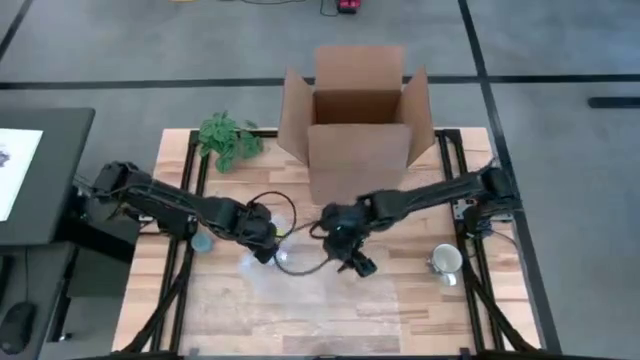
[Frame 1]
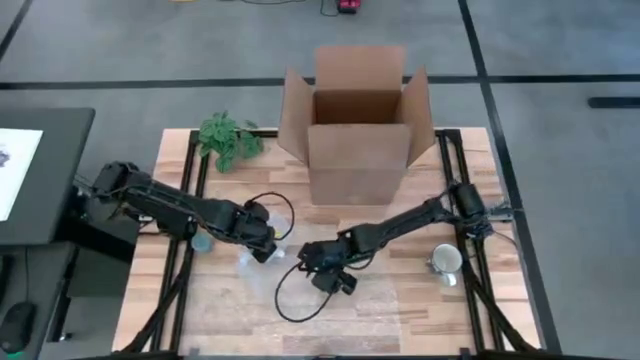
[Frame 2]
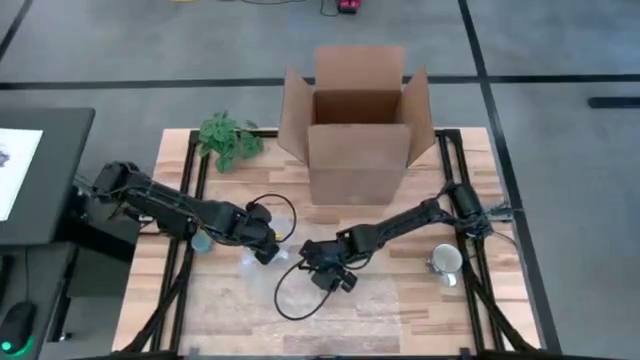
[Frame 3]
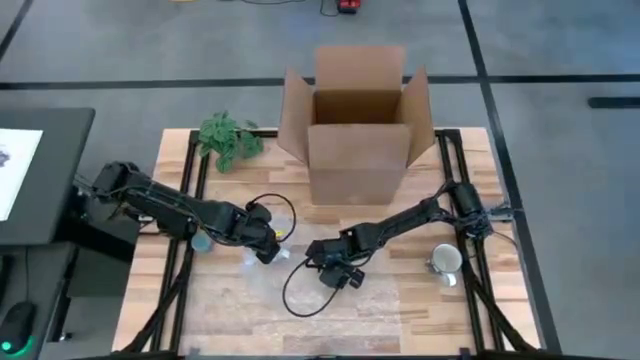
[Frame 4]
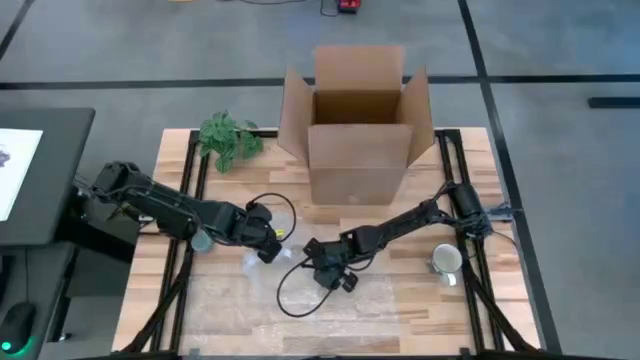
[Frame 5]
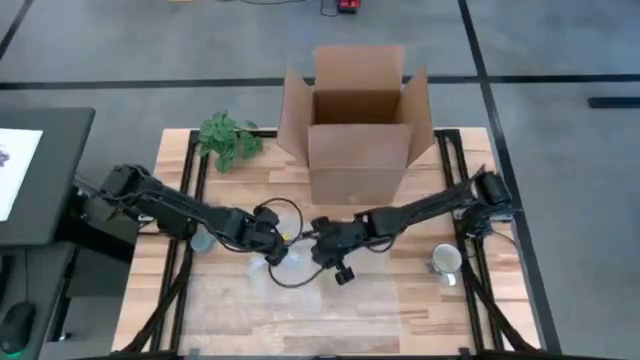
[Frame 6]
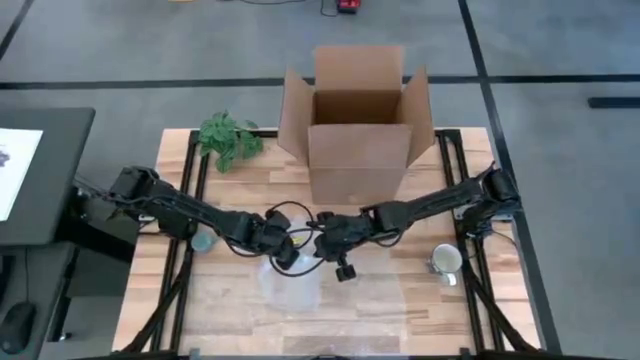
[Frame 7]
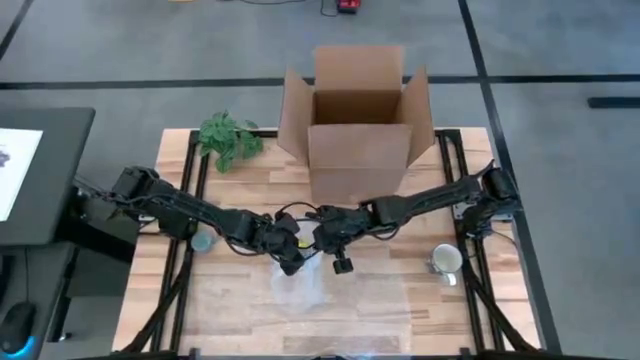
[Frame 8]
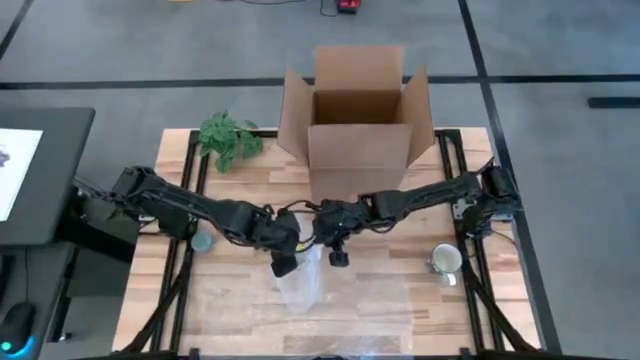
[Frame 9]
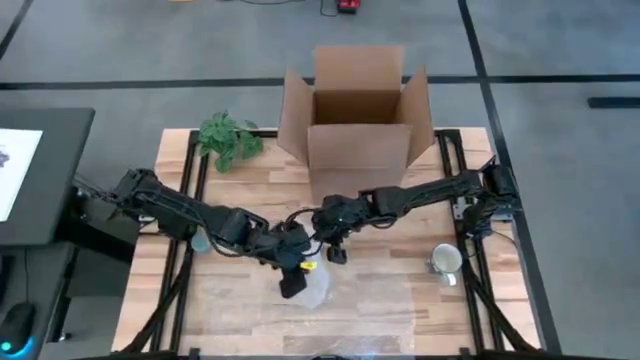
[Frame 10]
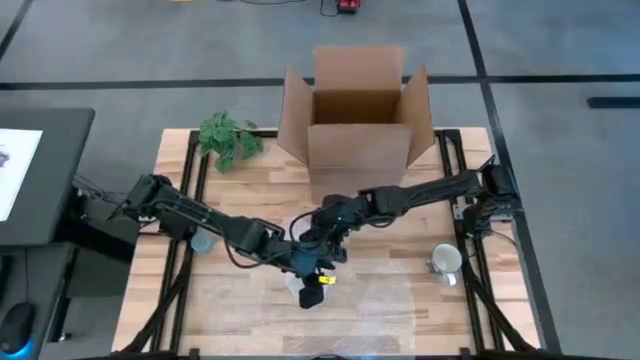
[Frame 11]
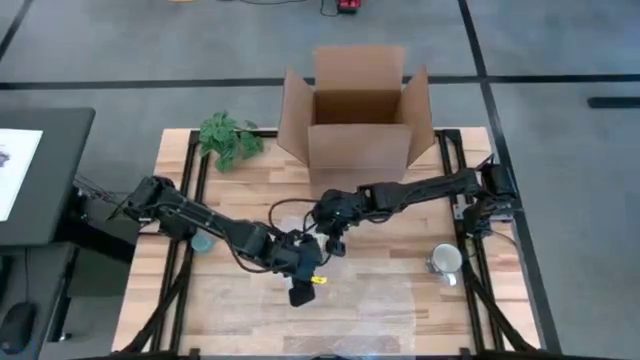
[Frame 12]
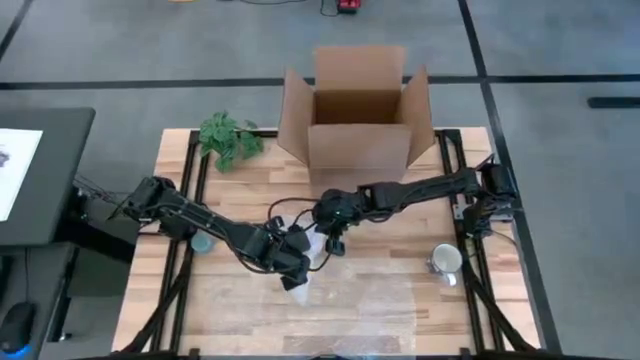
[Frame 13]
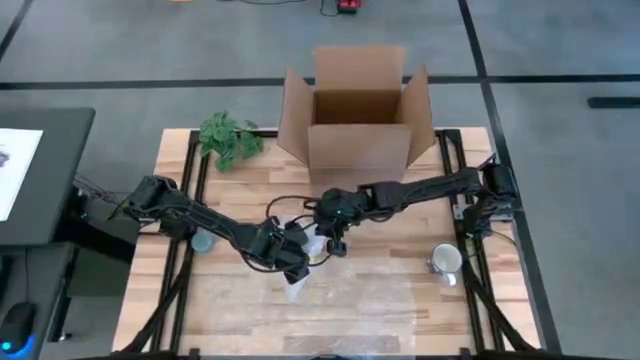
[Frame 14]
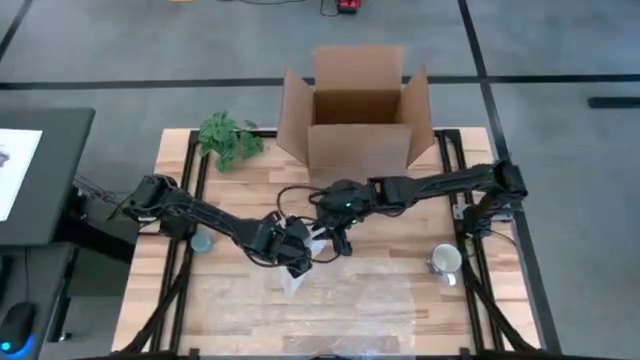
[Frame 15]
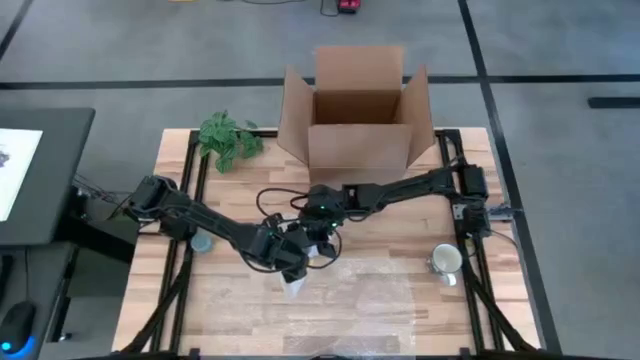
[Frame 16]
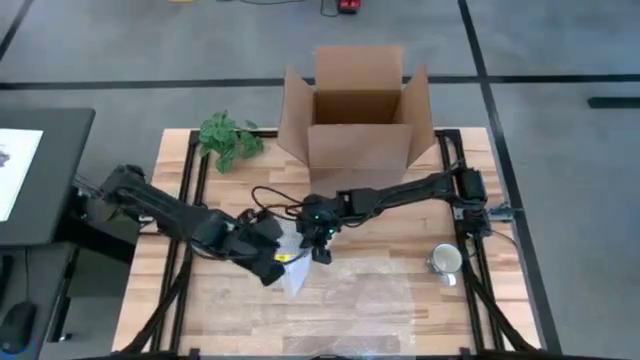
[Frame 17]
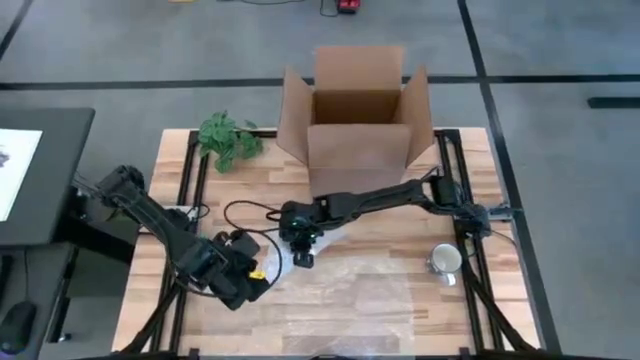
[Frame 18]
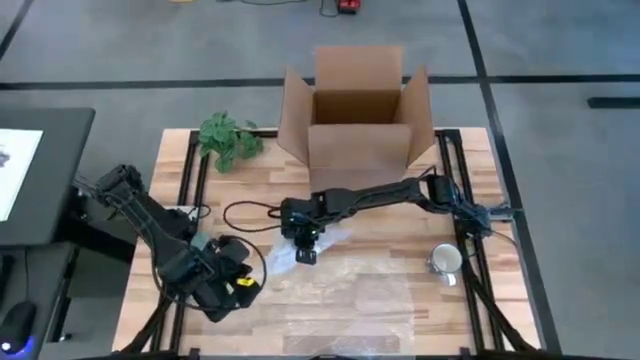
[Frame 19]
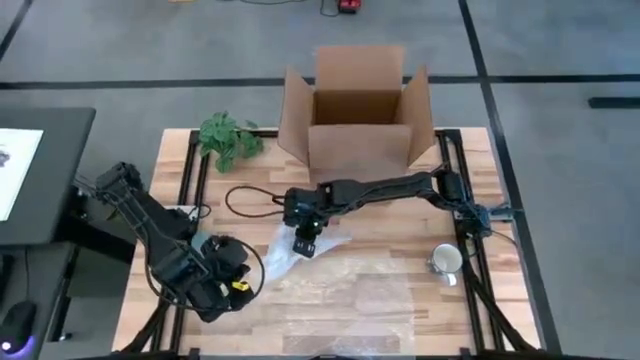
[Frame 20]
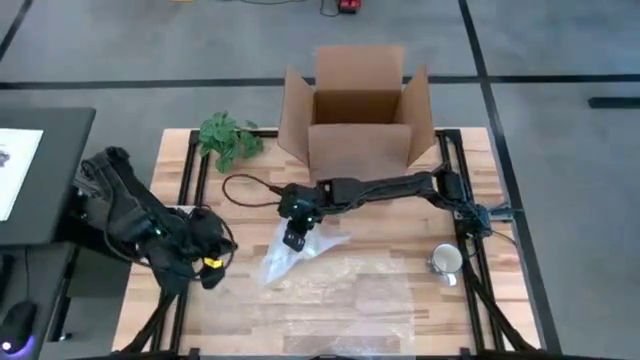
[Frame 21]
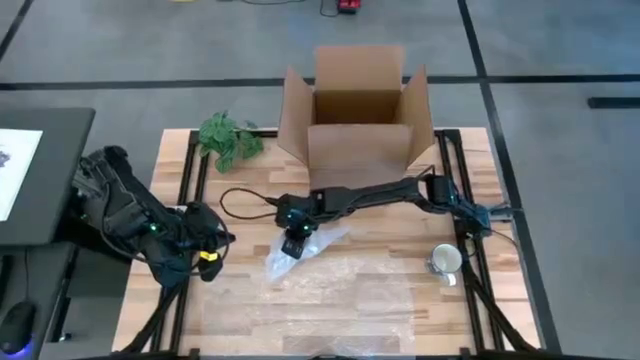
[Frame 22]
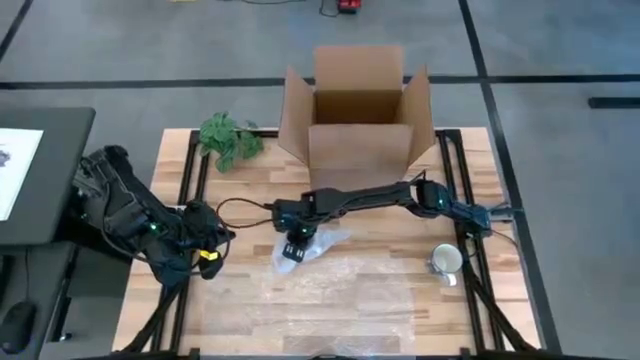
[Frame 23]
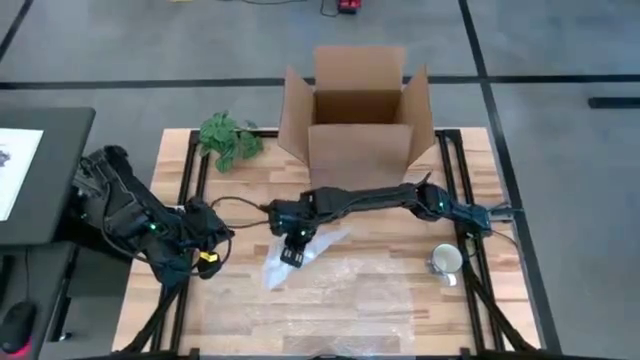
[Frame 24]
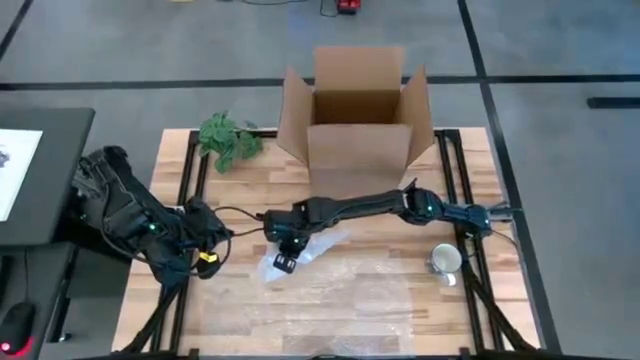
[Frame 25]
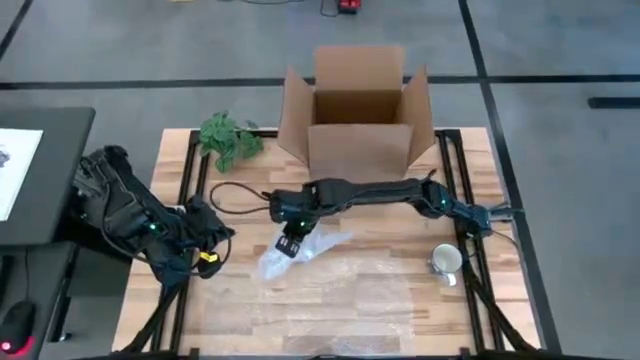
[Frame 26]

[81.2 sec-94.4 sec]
Task: wrap mug
Wrap the white mug with bubble wrap

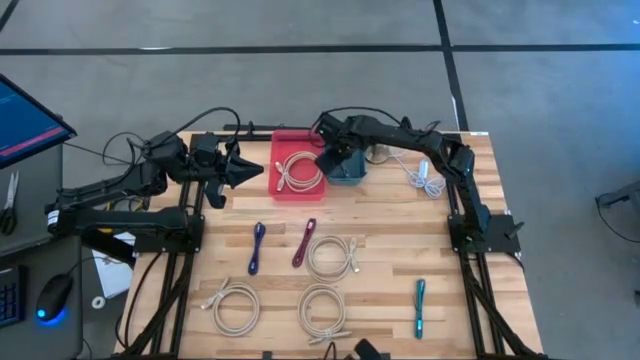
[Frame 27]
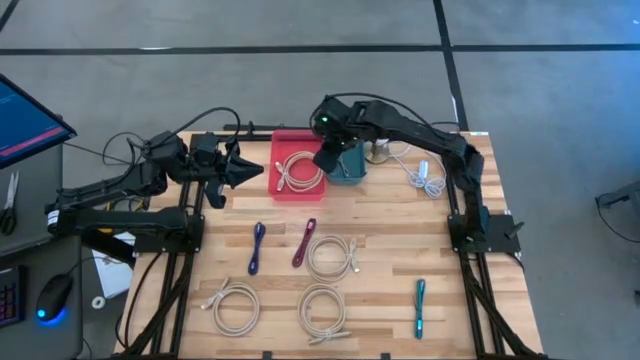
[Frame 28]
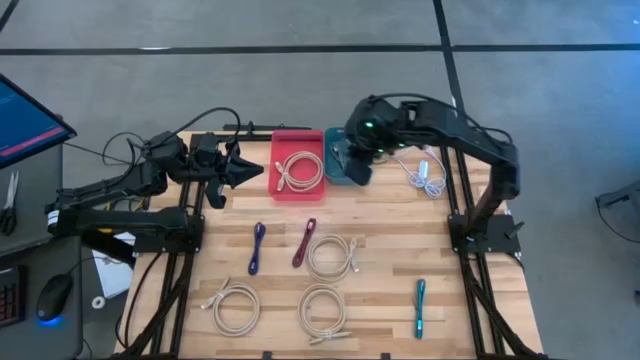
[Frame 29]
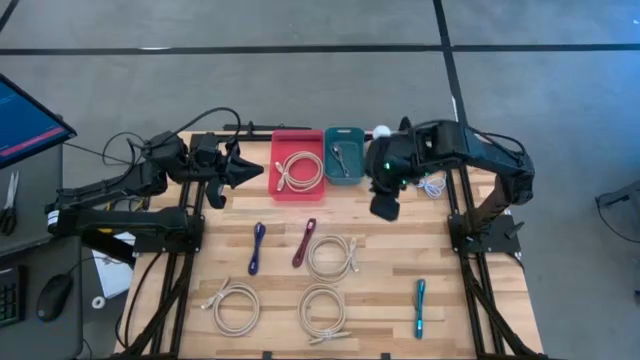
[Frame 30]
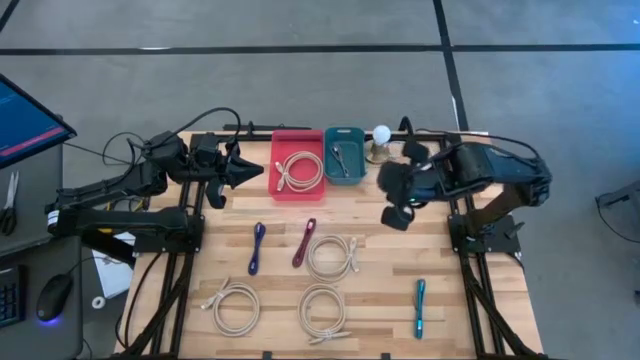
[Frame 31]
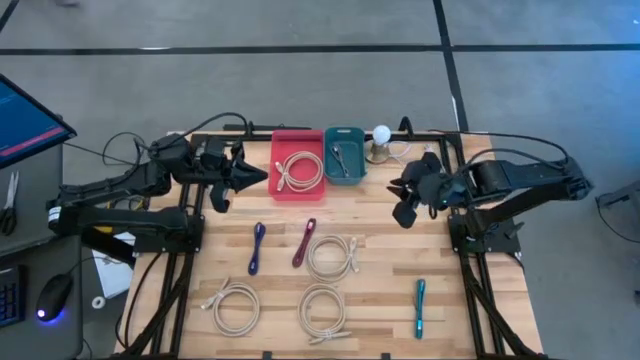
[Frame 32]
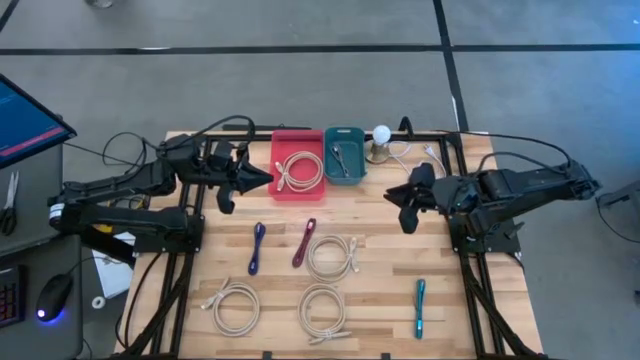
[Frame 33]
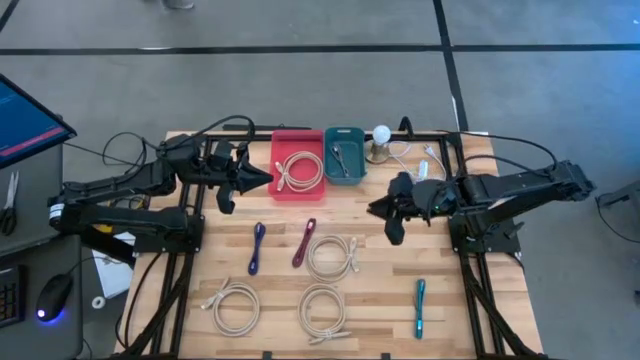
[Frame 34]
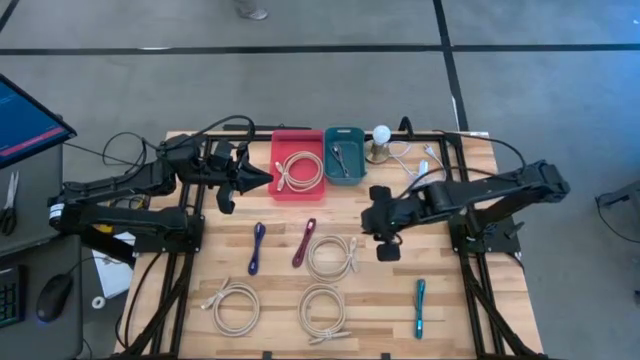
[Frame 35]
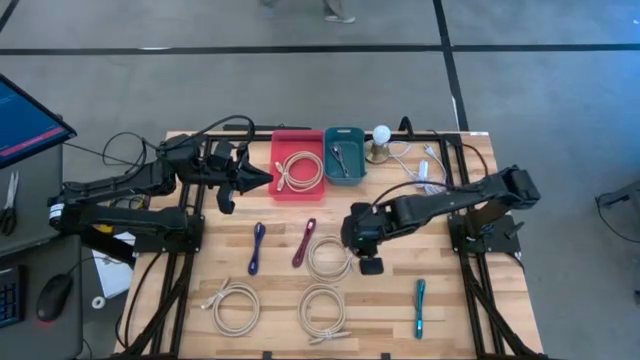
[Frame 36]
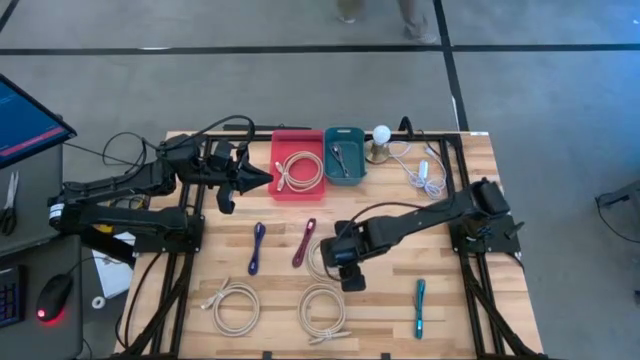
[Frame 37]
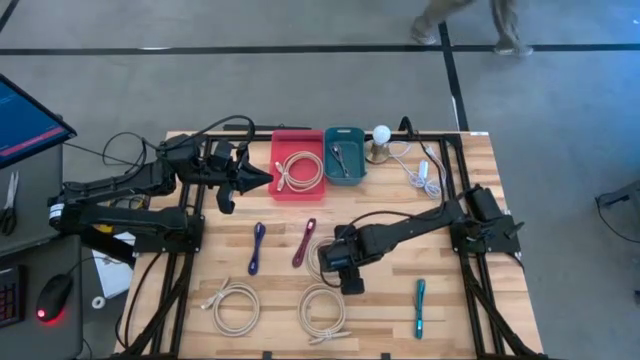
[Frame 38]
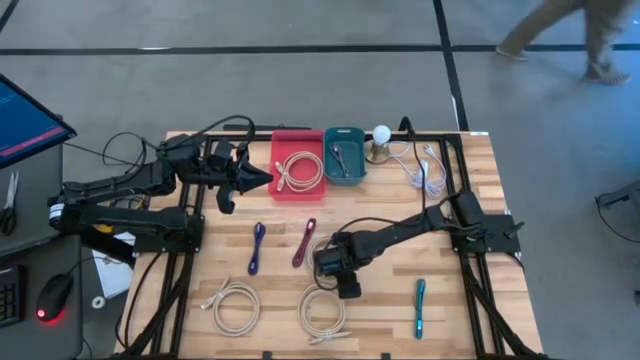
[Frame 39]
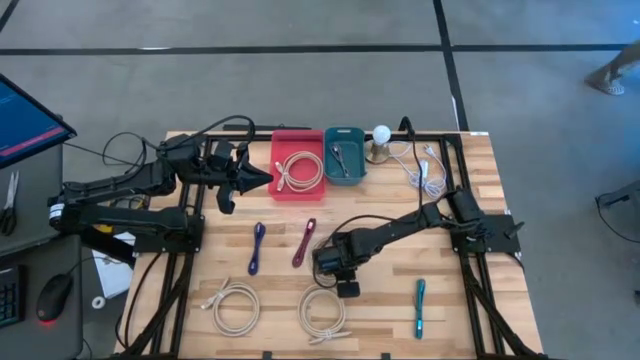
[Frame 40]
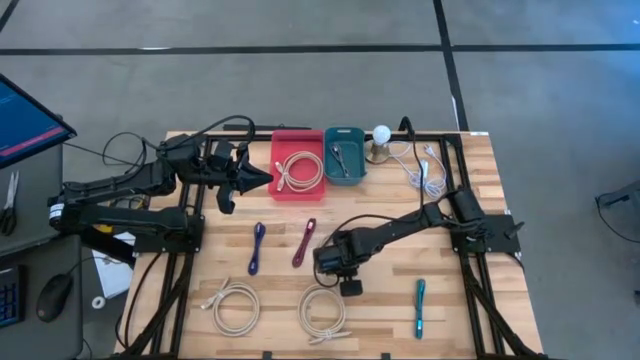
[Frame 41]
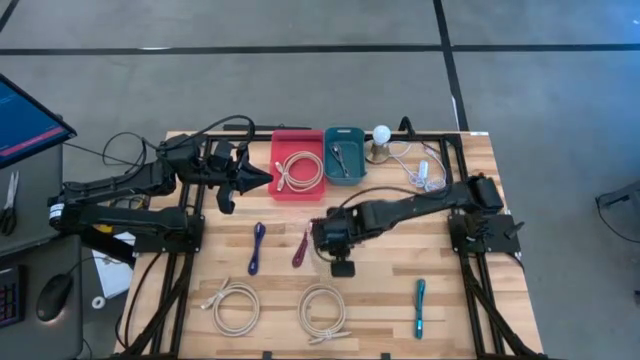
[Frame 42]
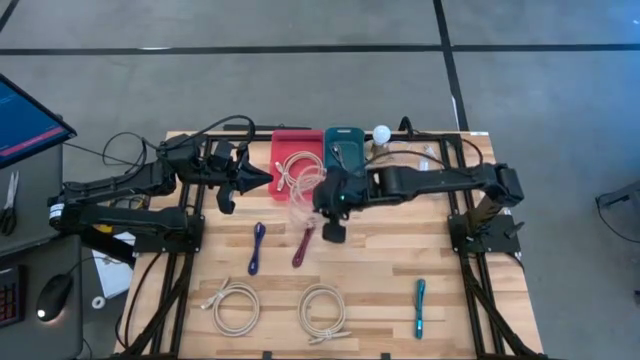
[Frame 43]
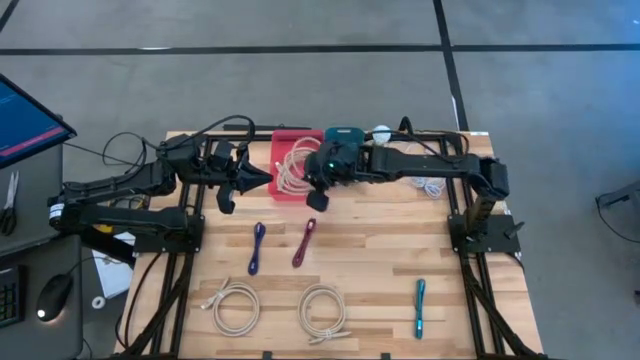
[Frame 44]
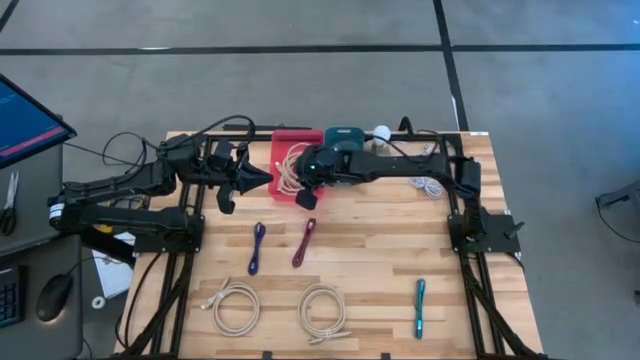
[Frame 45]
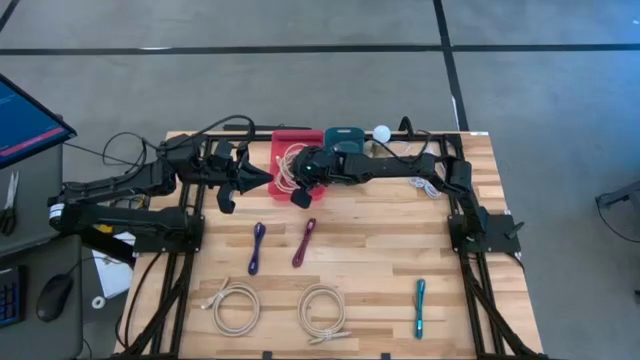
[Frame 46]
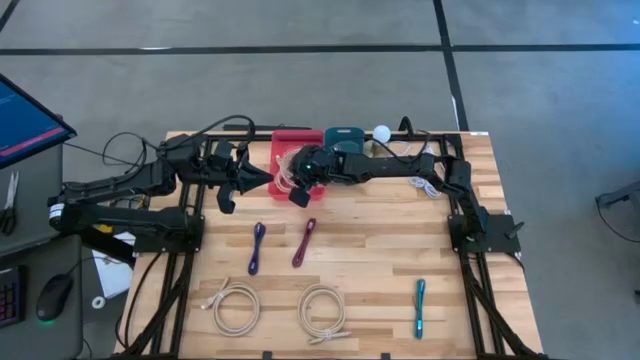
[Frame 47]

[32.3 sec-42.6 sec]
Task: Pick & Place USB Port
Put the light brown HDMI cable into the pink bin
